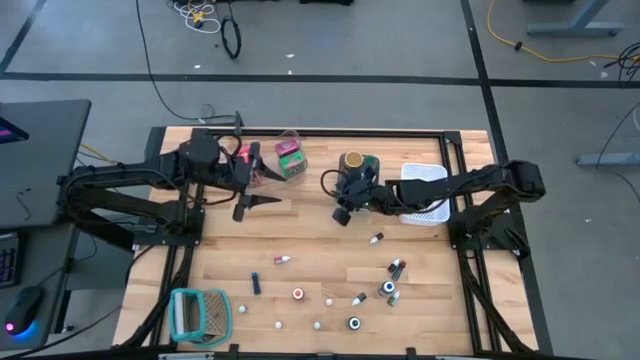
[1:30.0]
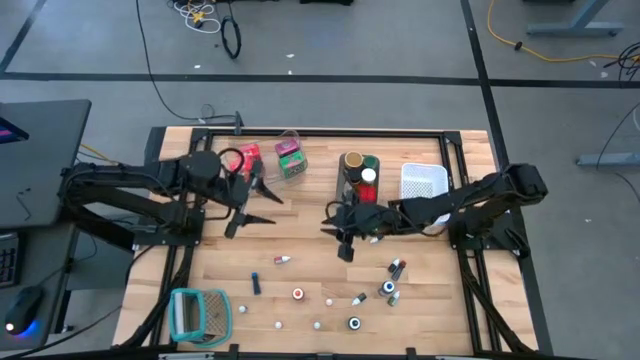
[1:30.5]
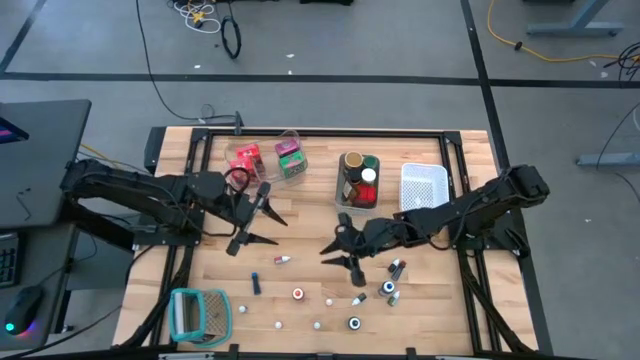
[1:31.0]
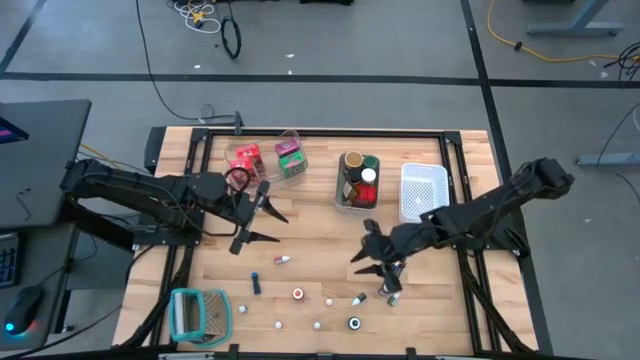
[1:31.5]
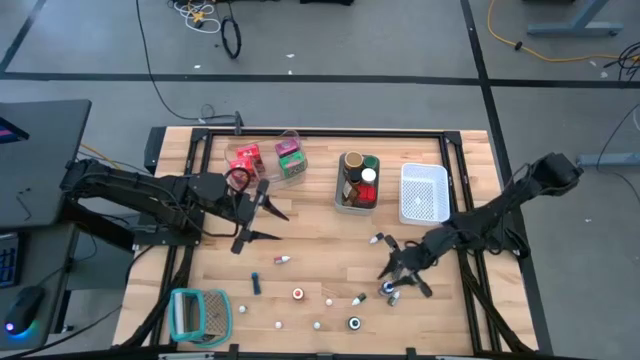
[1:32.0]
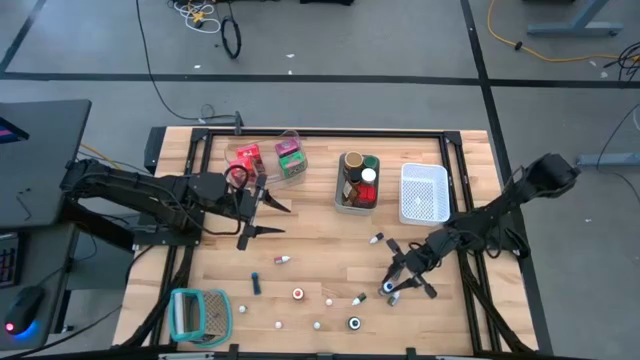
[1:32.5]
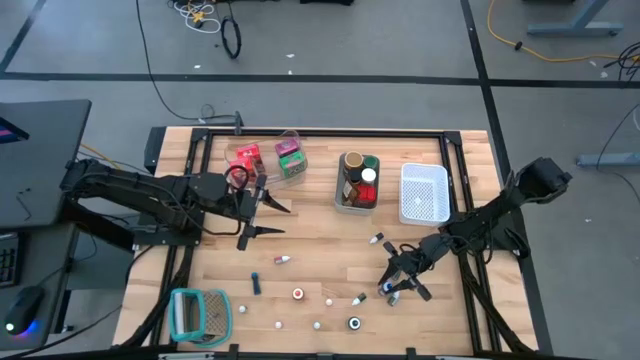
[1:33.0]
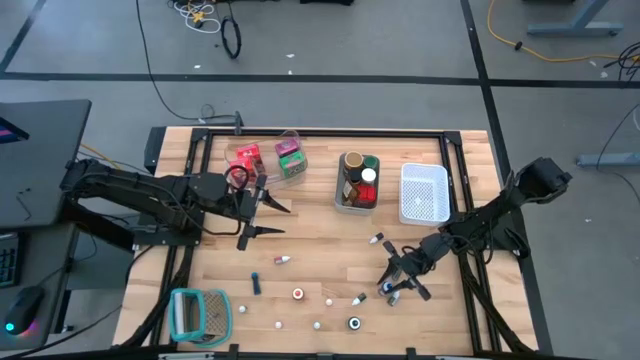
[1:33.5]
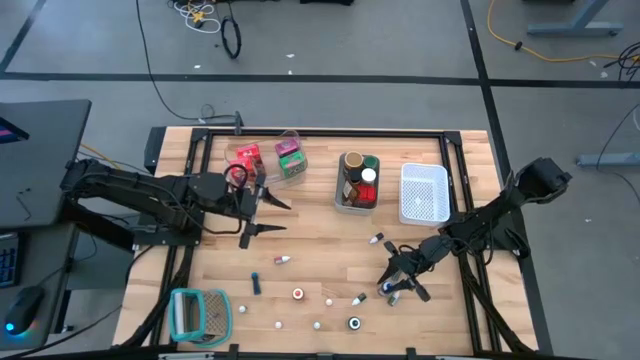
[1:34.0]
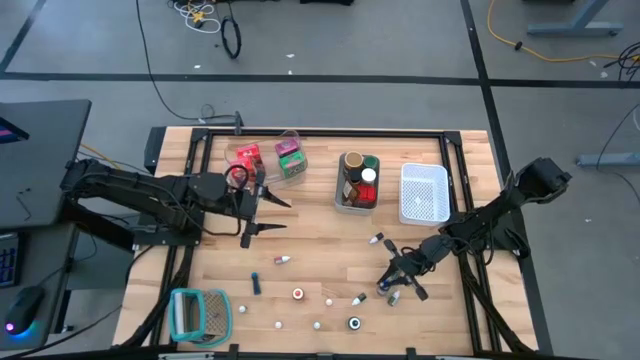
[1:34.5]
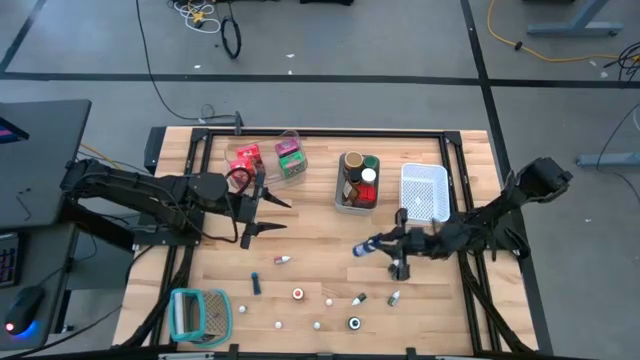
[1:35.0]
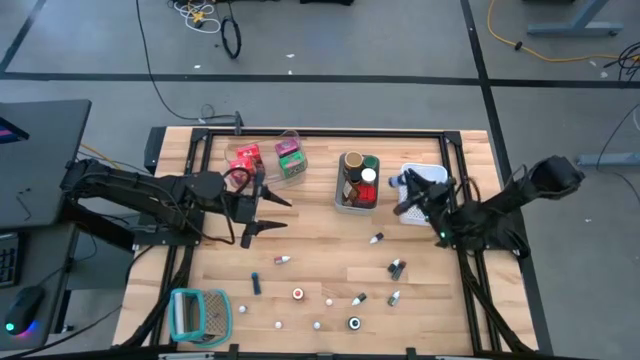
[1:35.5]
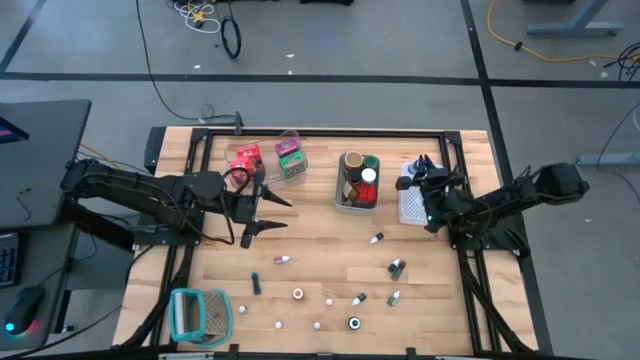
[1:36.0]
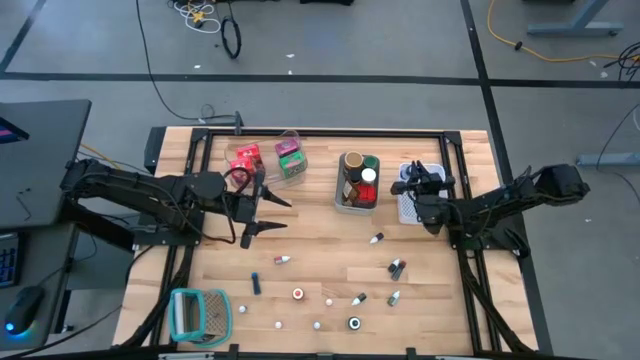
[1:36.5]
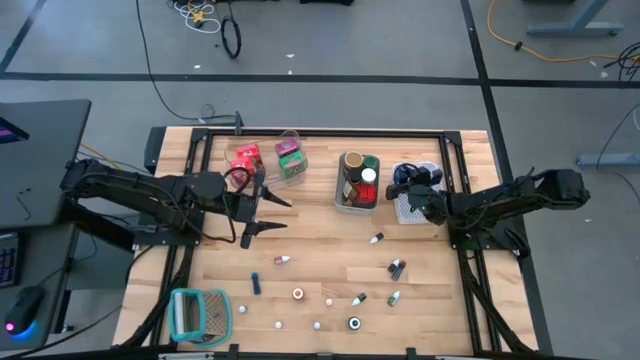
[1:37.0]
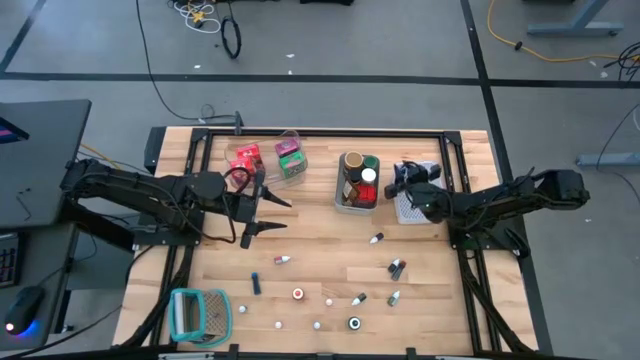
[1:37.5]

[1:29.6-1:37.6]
Task: Pick & Place Kitchen Items
Put the large blue food coloring bottle into the white bin

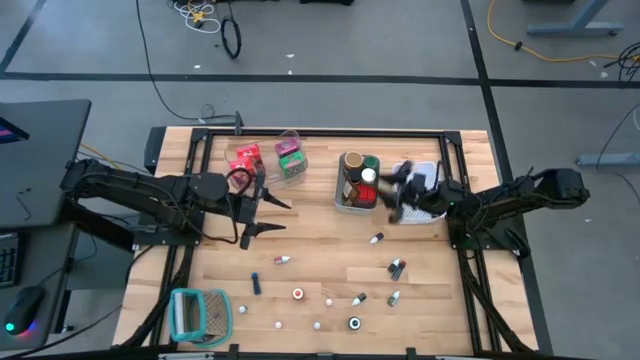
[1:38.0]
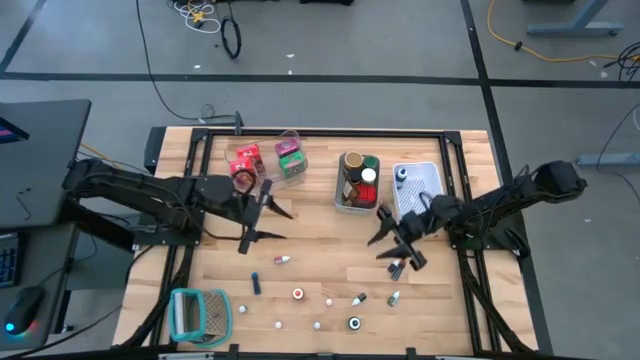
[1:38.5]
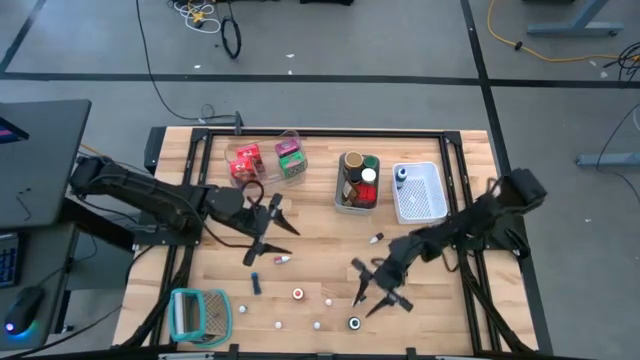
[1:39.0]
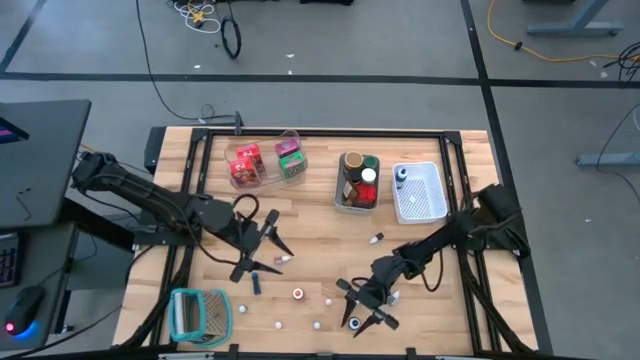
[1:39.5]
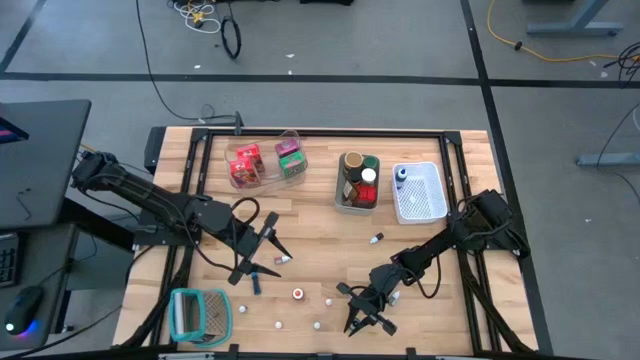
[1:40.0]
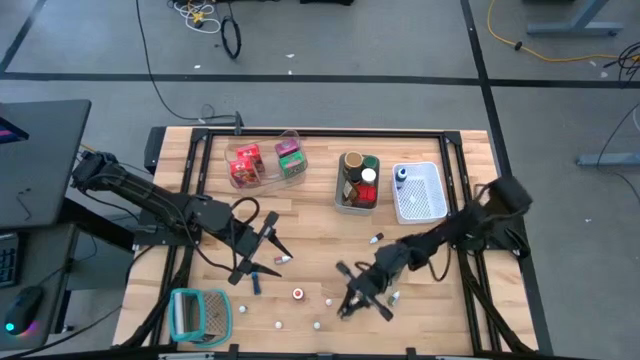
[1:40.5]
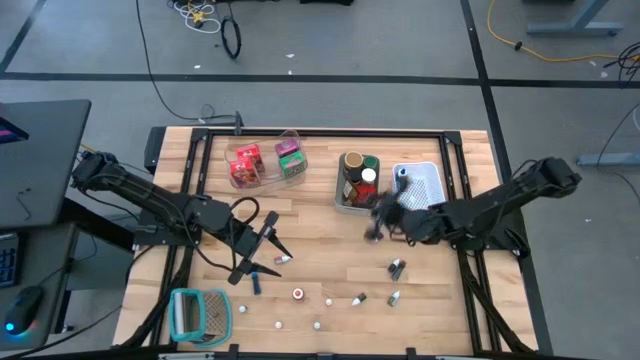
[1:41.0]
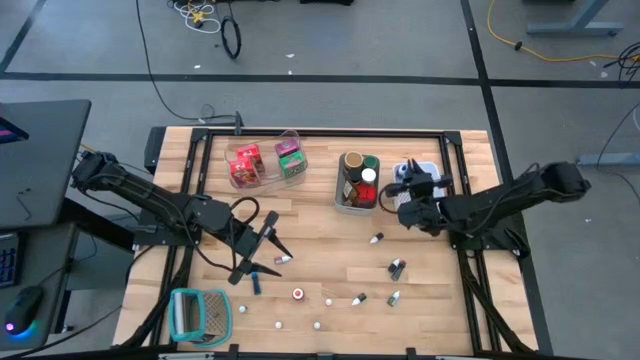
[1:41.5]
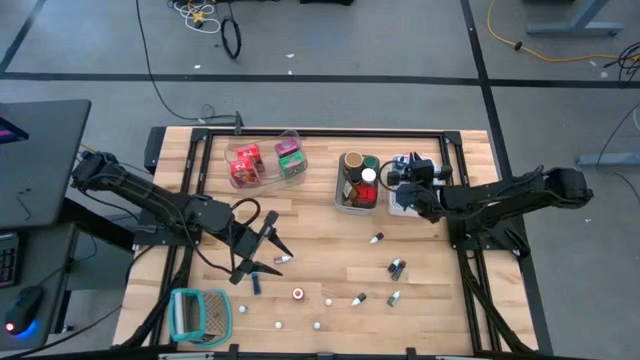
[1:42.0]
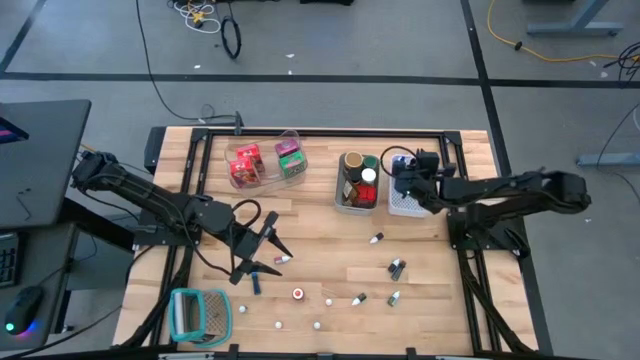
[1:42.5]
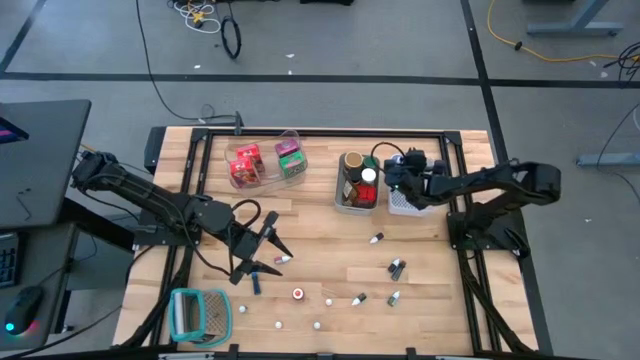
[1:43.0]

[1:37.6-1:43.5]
Put the large black food coloring bottle into the white bin

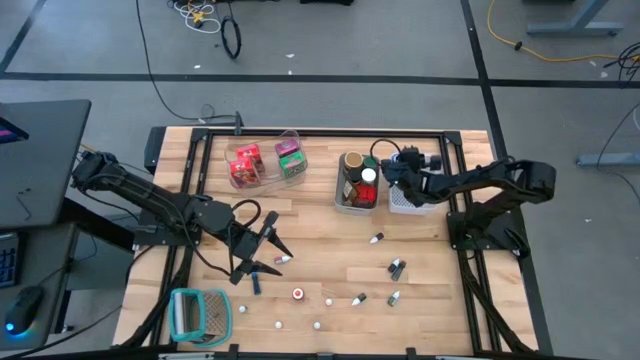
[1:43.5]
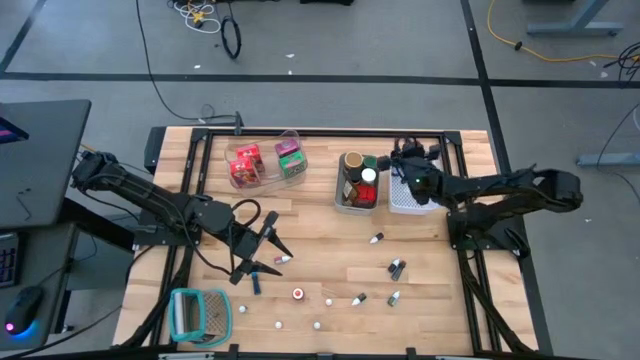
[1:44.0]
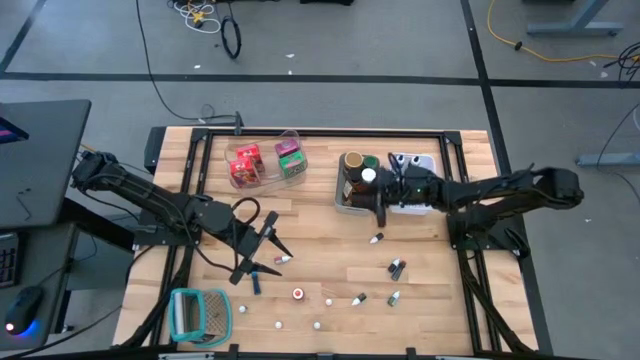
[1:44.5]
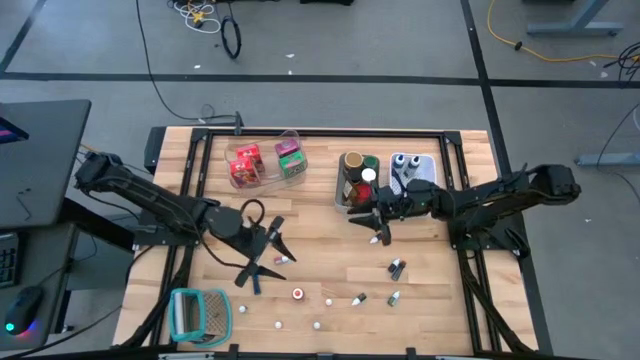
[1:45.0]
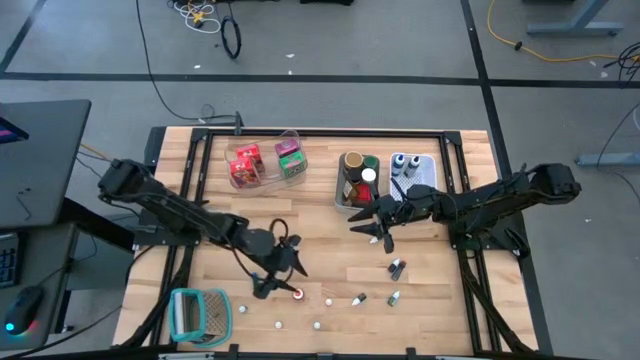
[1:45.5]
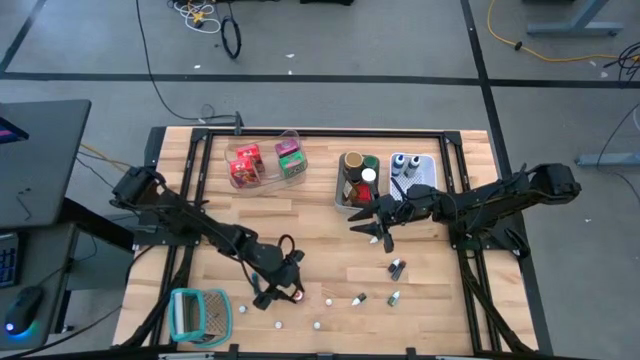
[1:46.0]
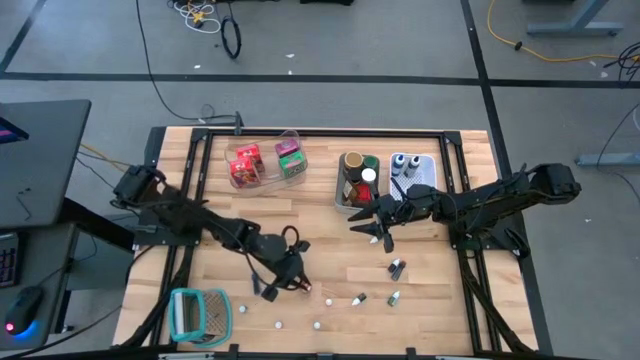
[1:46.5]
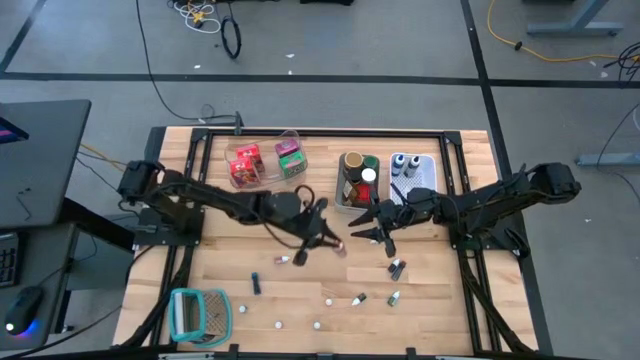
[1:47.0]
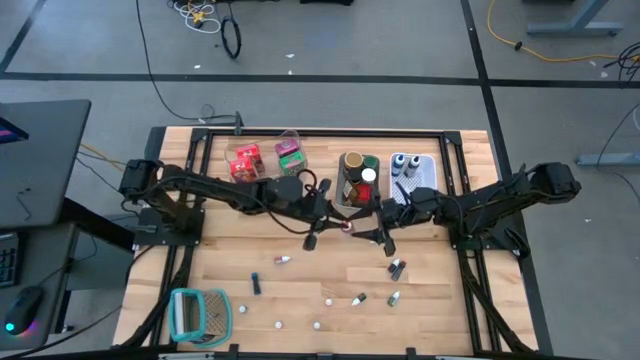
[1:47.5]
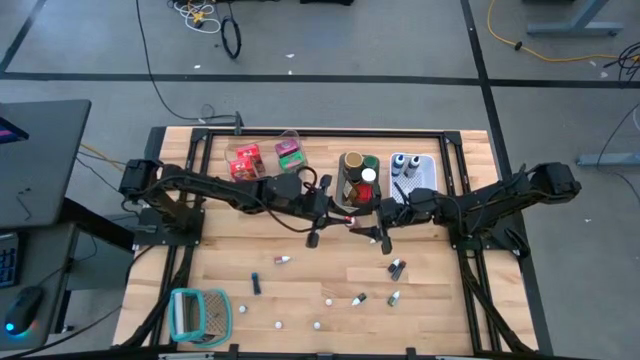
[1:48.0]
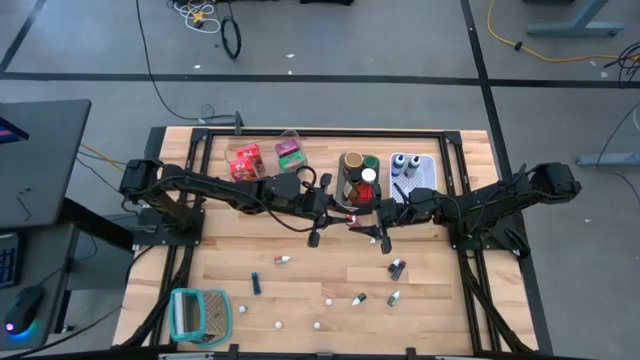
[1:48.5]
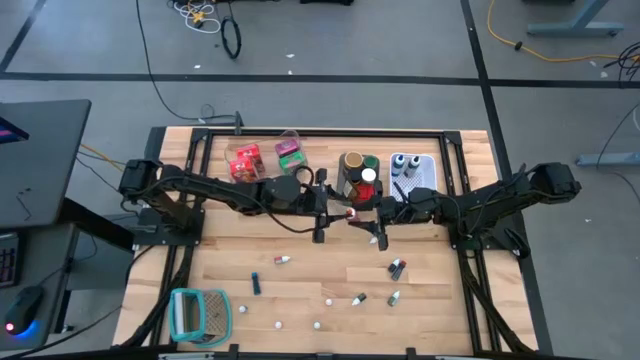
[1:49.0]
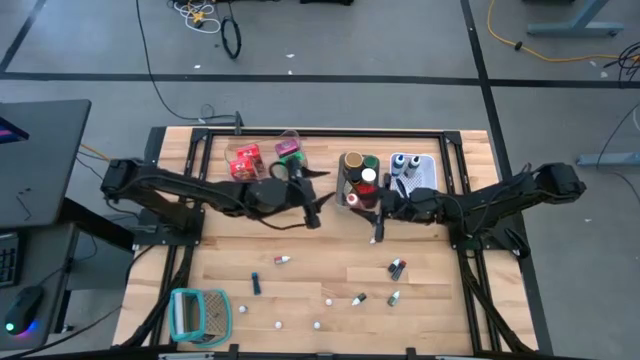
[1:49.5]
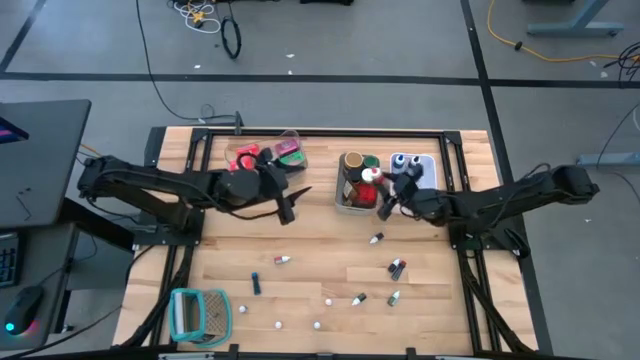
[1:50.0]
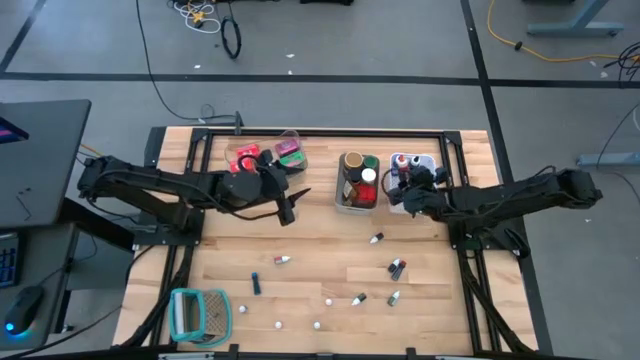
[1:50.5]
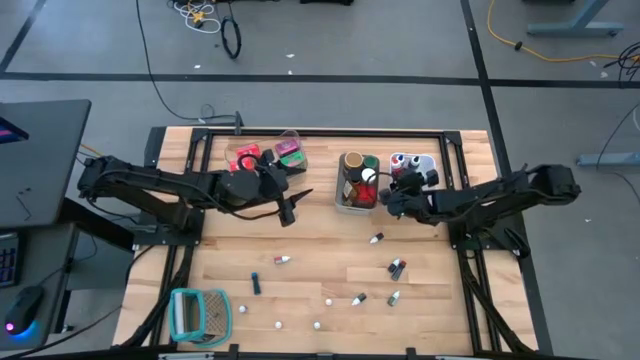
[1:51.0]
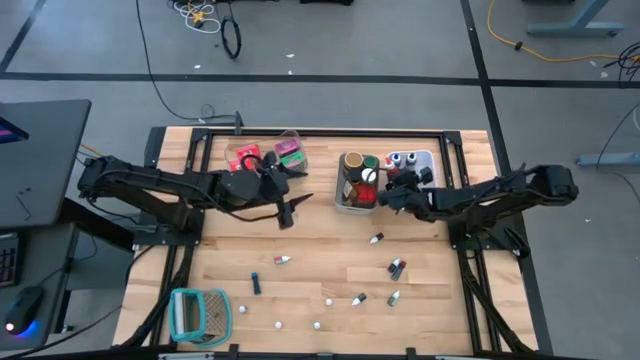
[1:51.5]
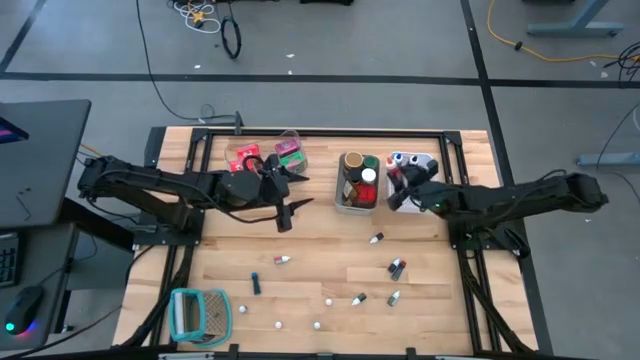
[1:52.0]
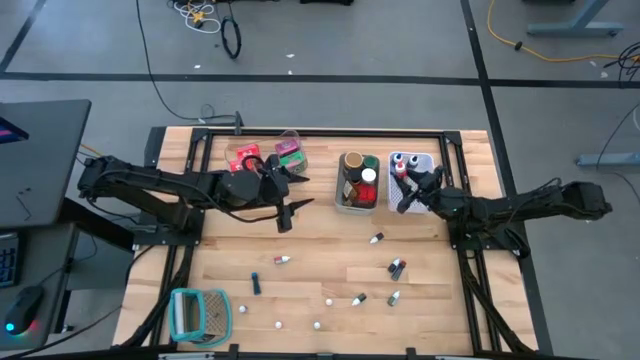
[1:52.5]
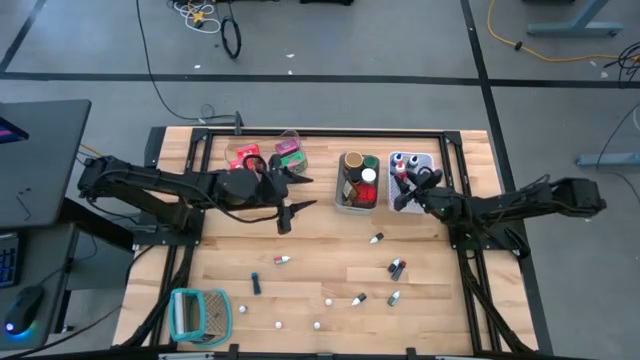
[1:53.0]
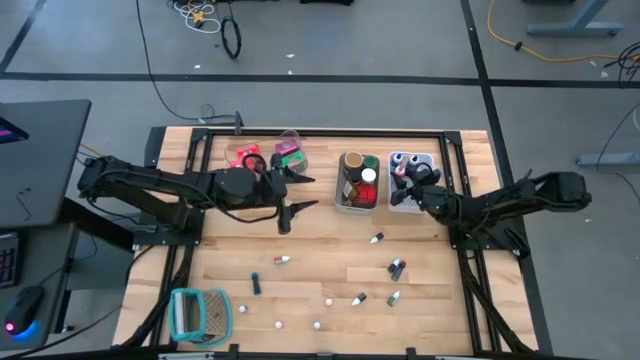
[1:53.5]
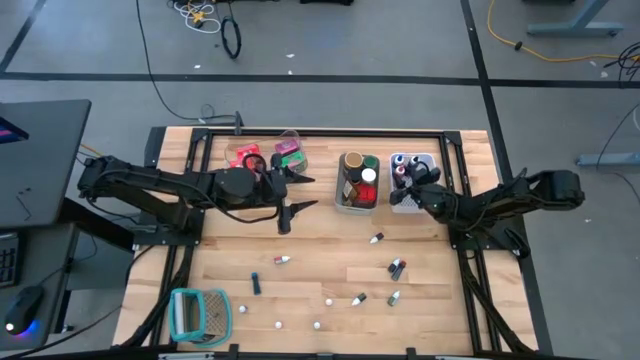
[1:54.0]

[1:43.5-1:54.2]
Put the large orange food coloring bottle into the white bin
